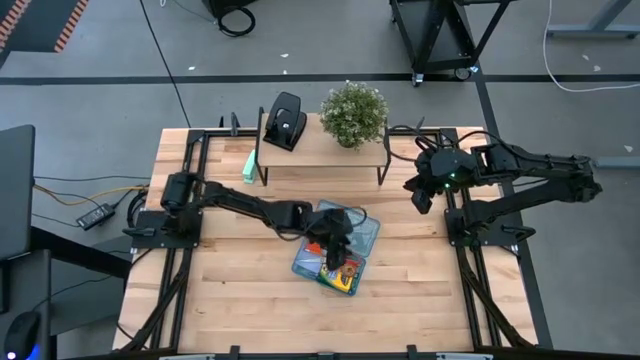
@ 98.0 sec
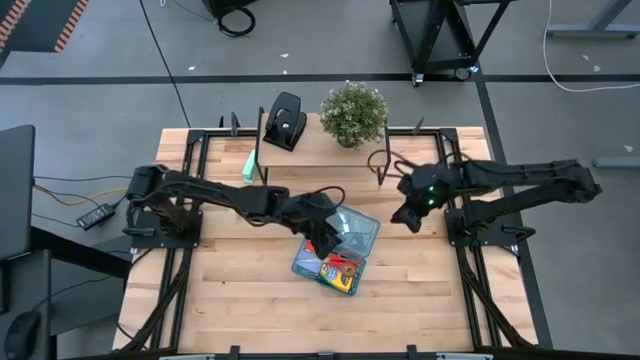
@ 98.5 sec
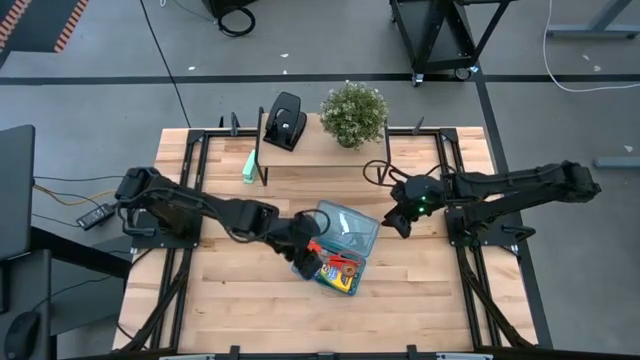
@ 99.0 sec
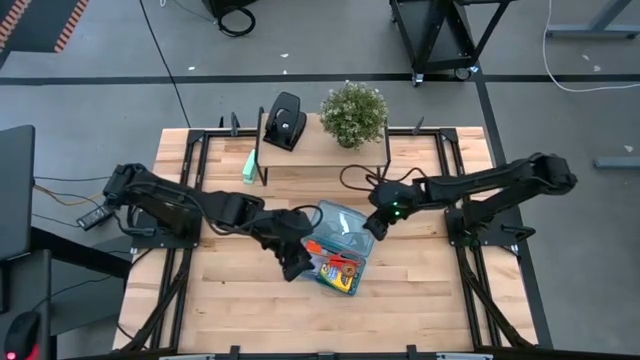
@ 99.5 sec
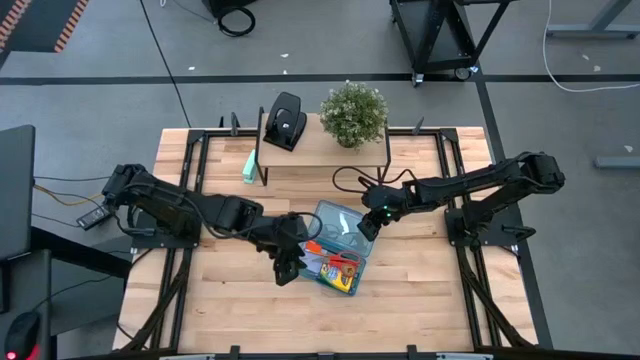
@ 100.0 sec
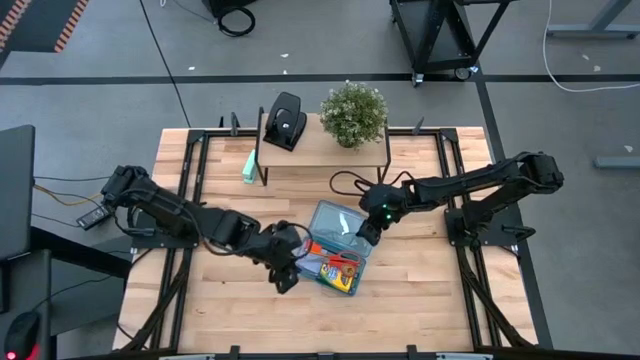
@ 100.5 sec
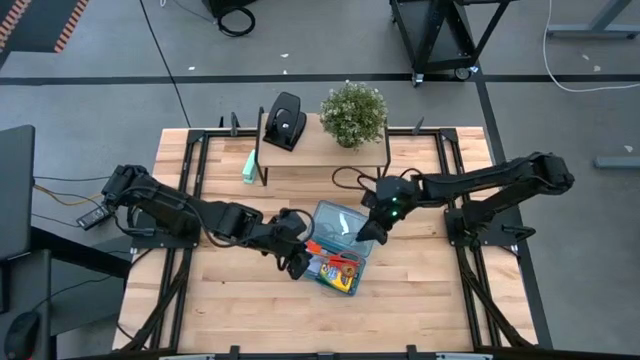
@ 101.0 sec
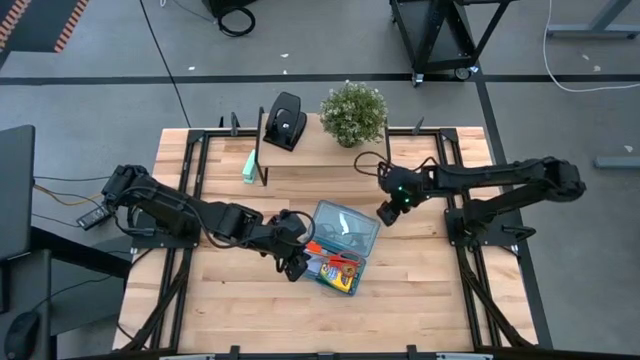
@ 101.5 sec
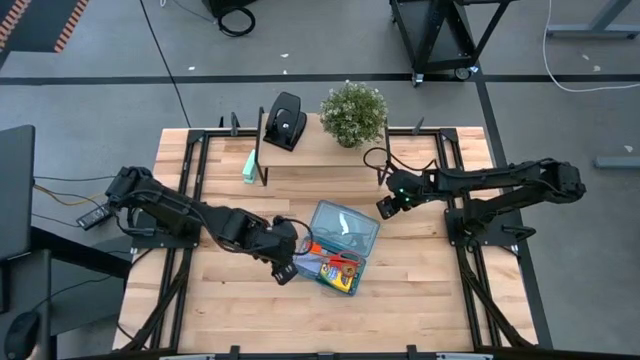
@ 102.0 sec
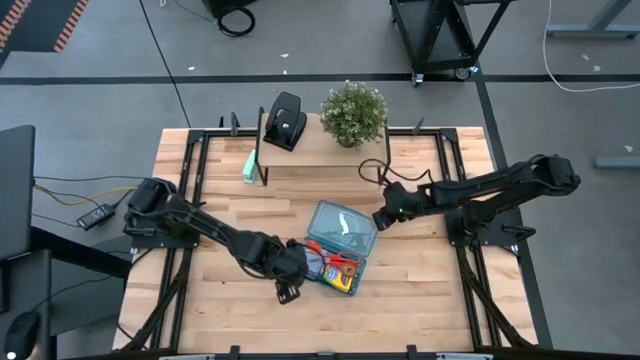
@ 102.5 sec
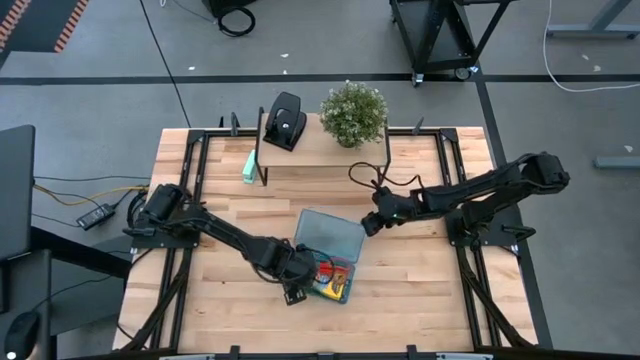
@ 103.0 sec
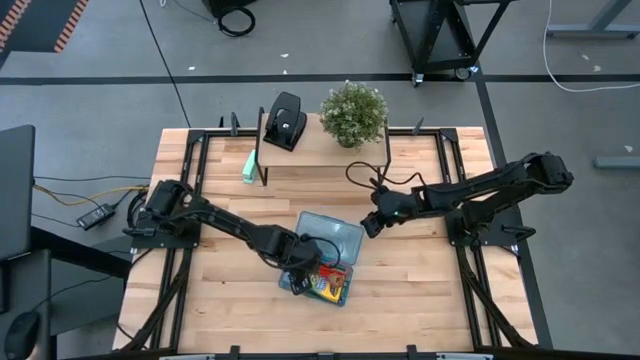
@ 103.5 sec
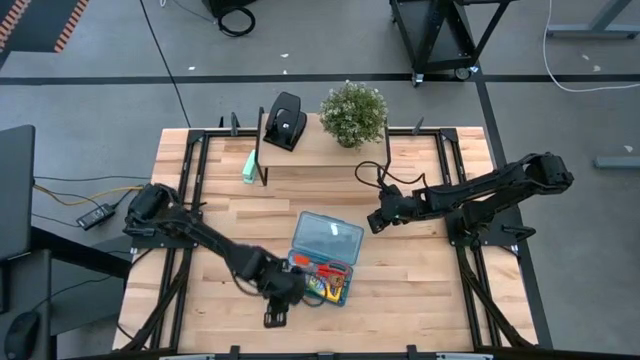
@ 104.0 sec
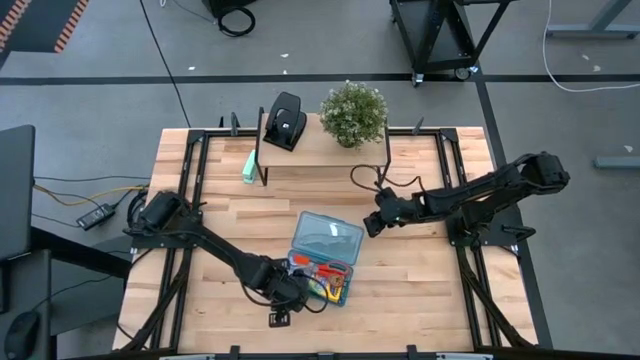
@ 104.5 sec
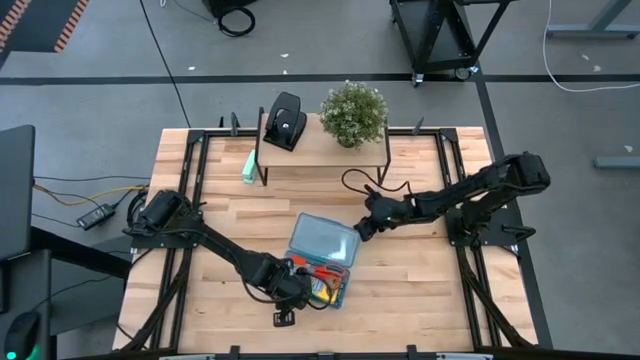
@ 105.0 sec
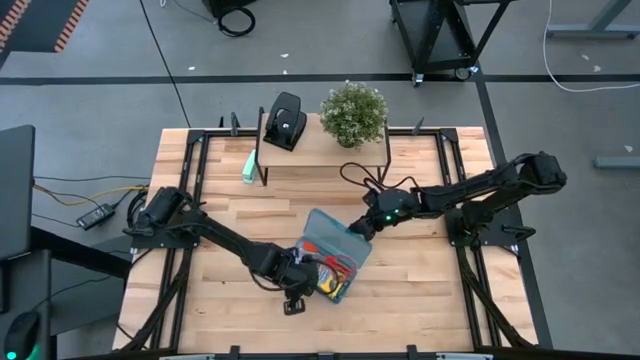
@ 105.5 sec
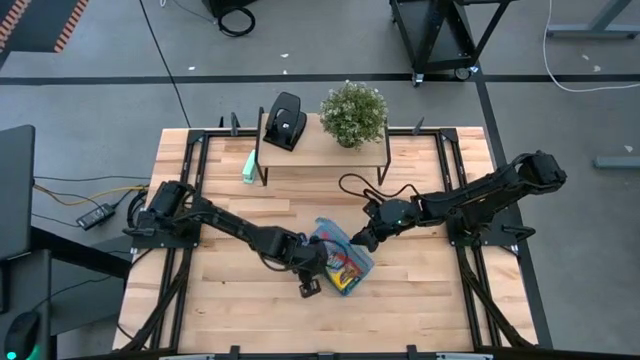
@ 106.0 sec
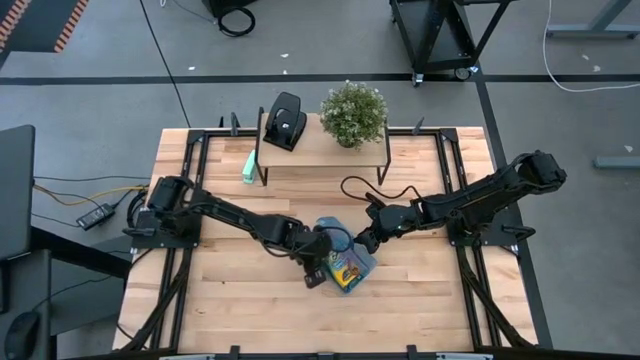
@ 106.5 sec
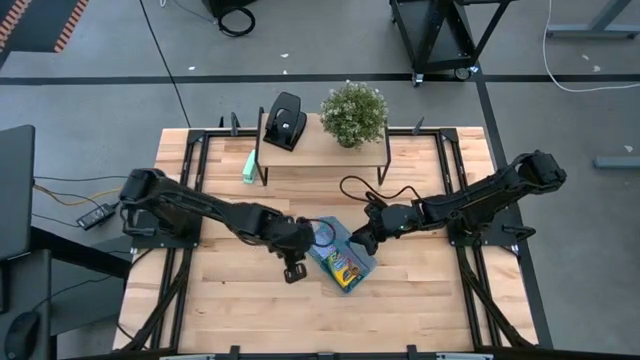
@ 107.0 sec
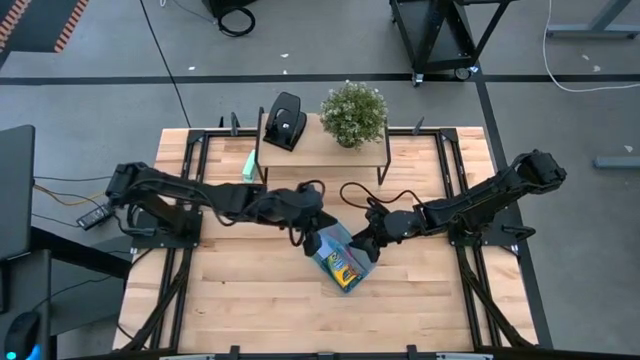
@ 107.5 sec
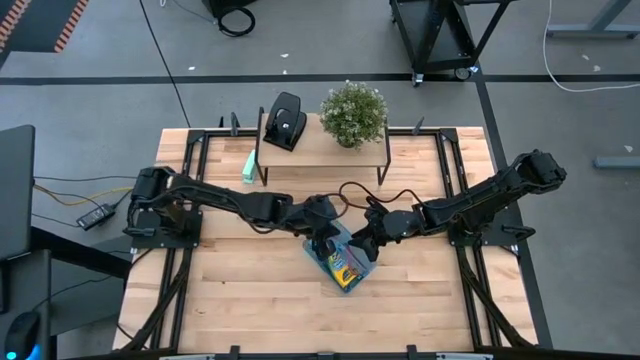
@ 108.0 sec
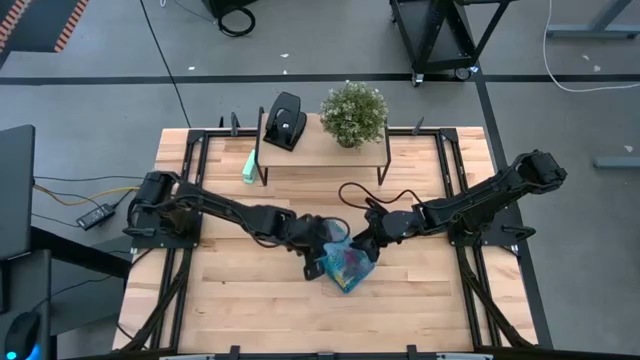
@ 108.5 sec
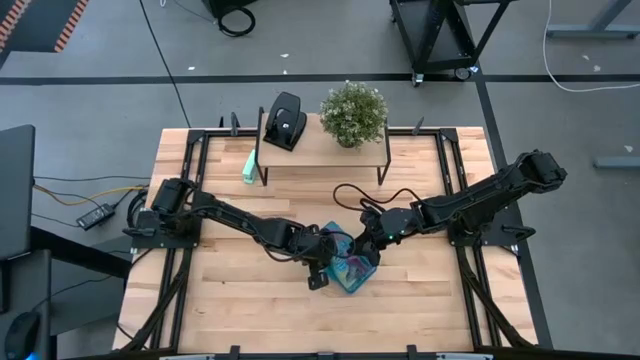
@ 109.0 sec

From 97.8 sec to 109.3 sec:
Task: Pack school essentials
Close the blue supply box

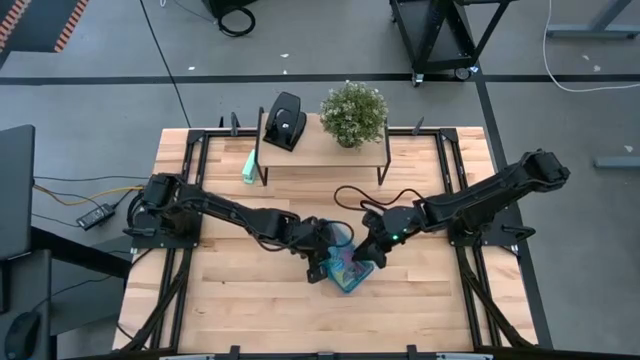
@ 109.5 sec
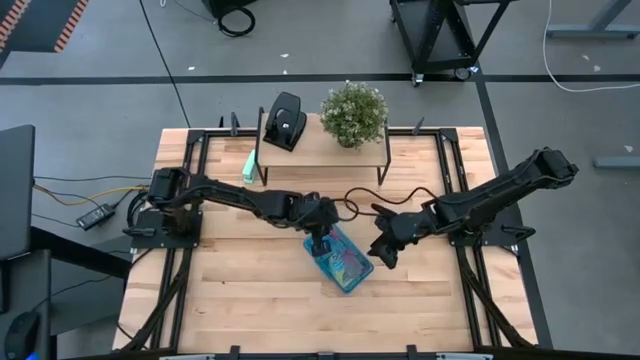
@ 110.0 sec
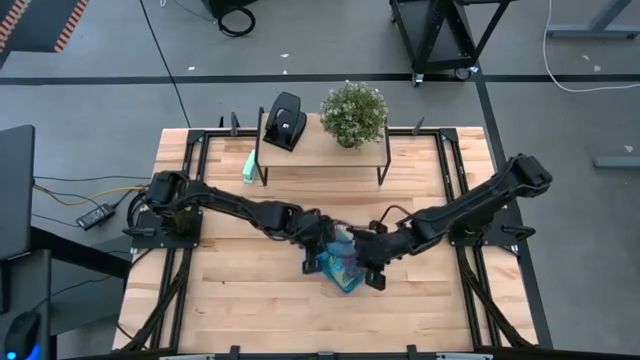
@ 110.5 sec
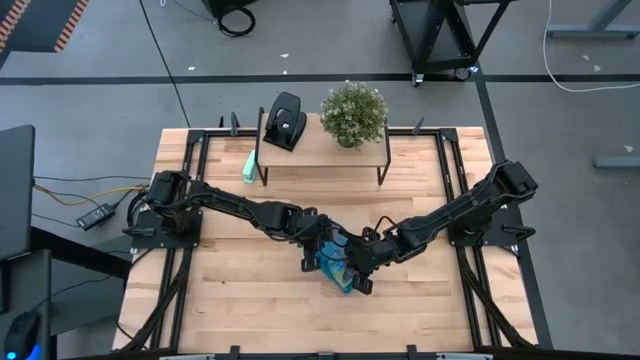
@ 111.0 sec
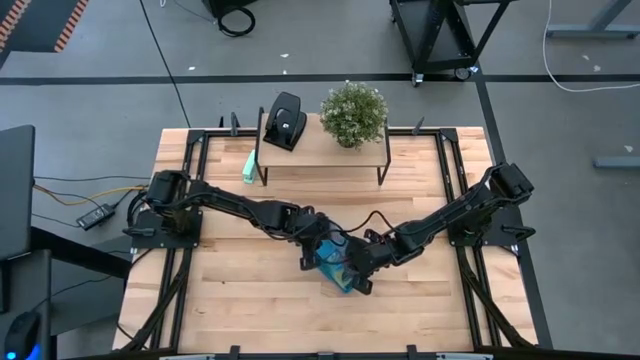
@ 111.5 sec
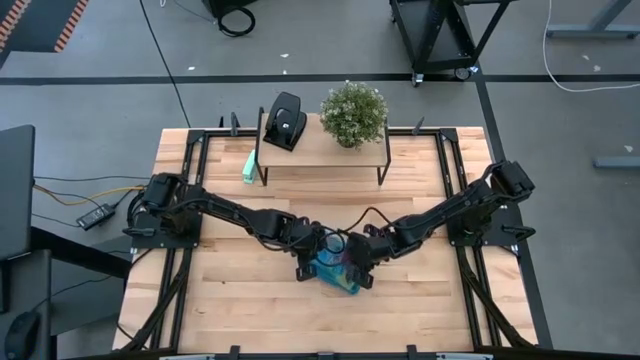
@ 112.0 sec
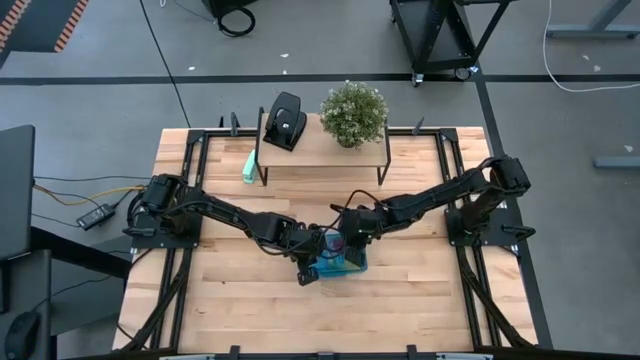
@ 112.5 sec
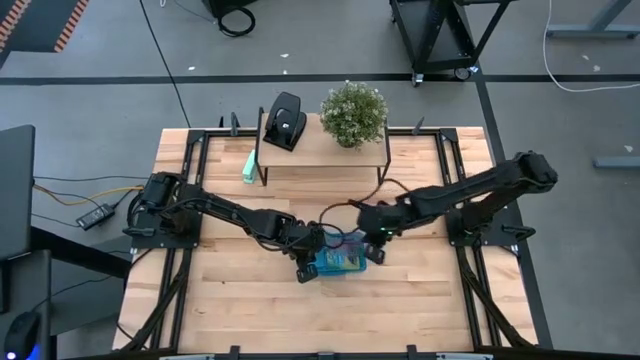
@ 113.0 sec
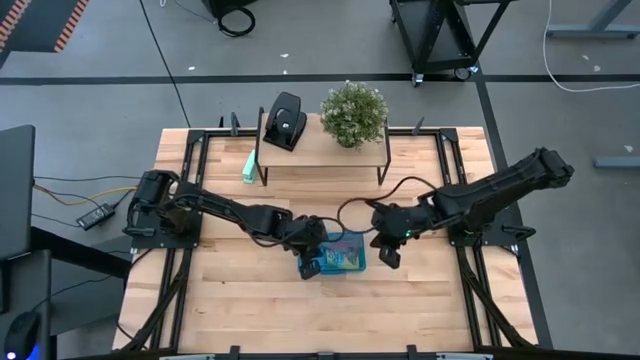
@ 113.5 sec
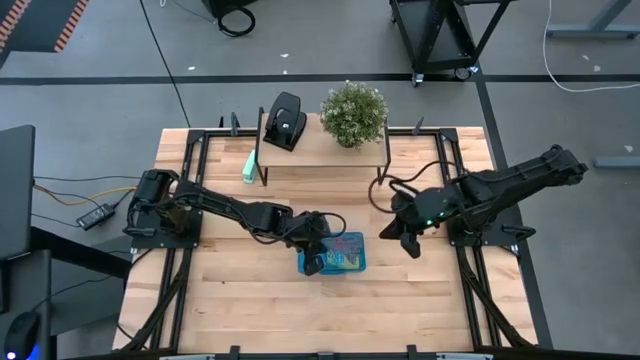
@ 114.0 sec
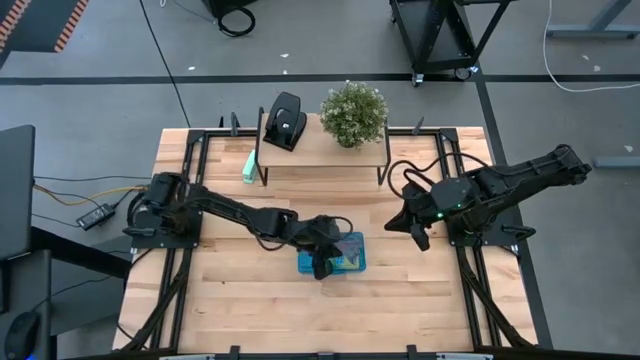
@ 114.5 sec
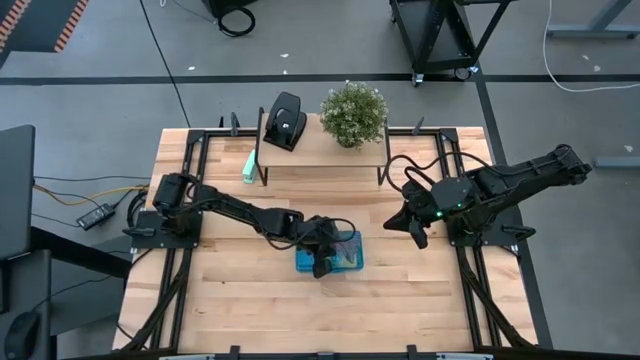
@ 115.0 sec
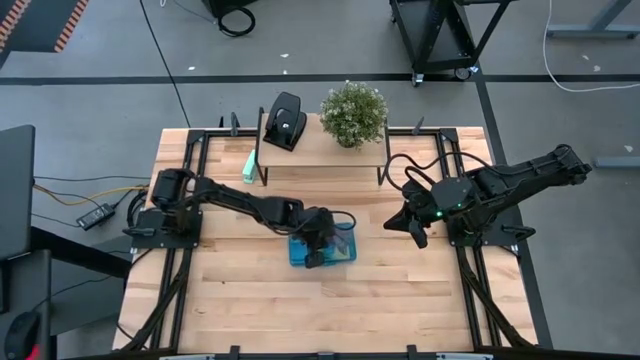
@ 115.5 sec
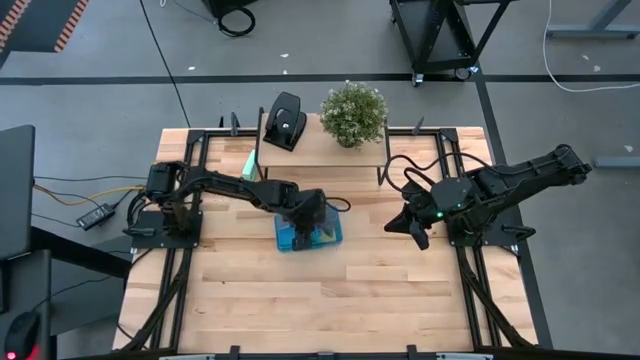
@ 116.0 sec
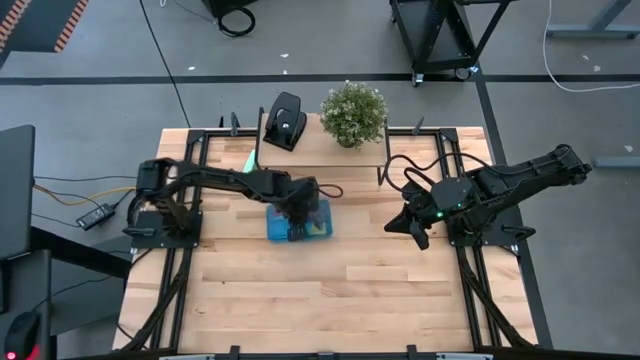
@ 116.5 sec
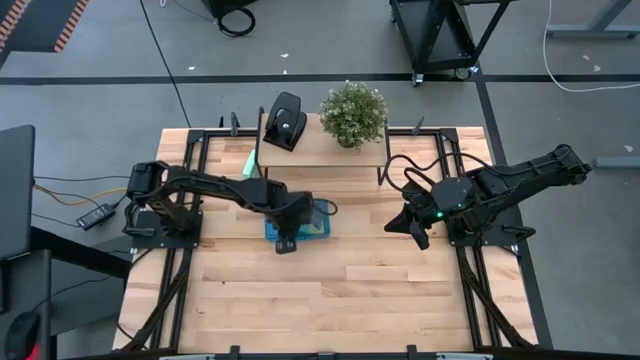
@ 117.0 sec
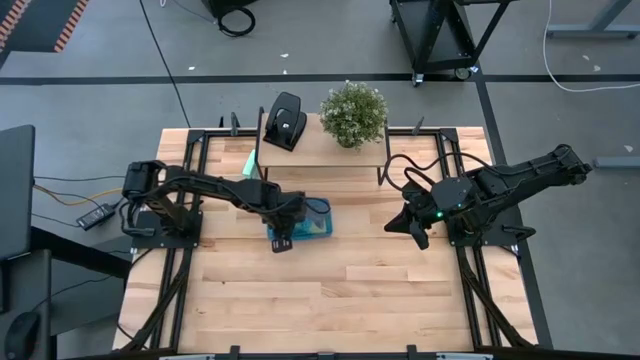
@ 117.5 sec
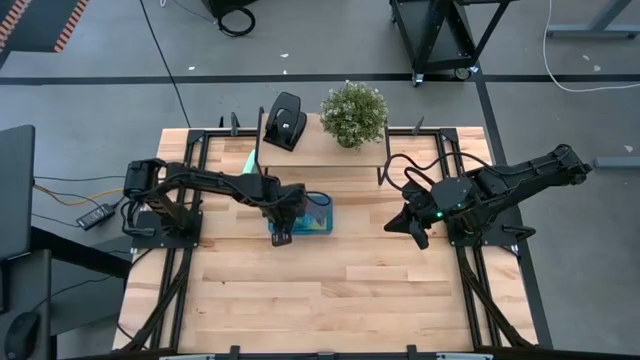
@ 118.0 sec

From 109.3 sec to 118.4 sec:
Move the blue supply box to the center of the table

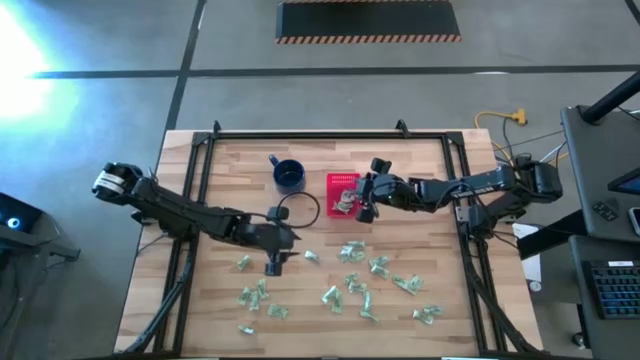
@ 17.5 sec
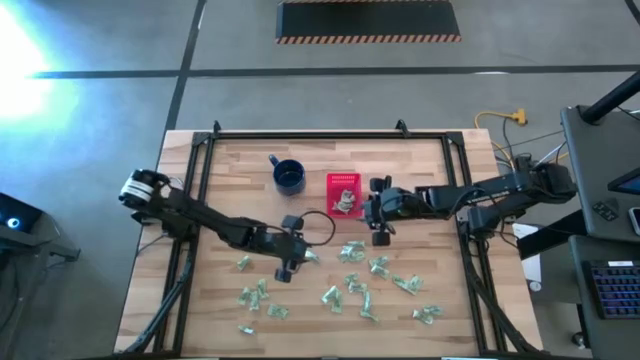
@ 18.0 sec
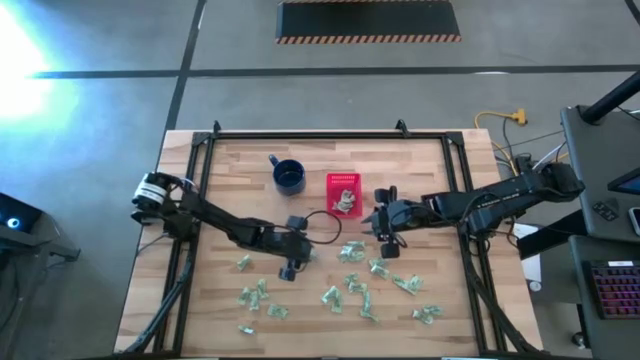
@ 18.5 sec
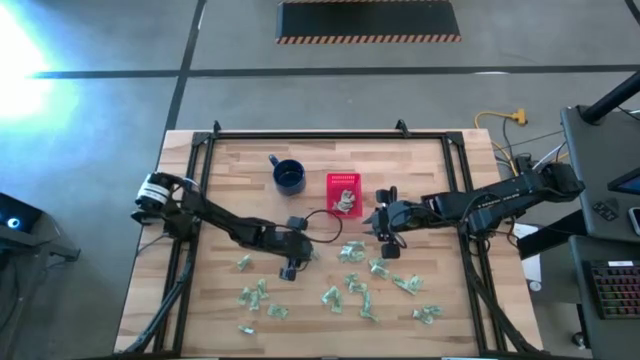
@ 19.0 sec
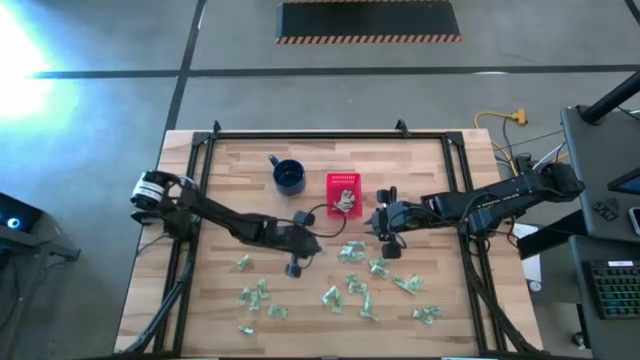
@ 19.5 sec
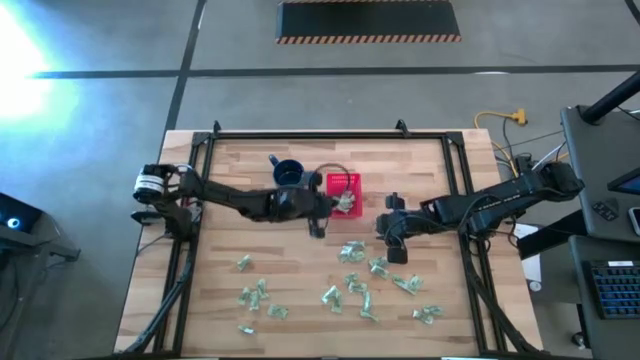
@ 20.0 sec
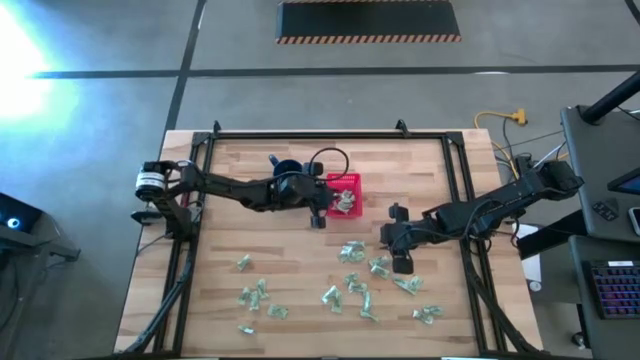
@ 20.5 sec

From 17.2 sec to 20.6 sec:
Task: Pick and place items into bin
Put the green stevia packet into the red bin
